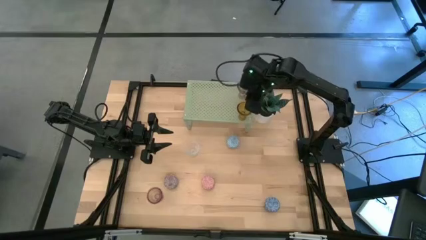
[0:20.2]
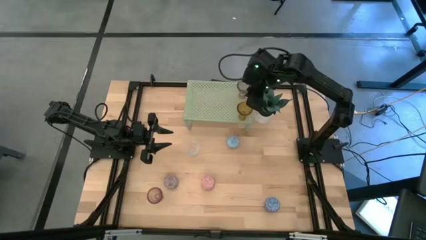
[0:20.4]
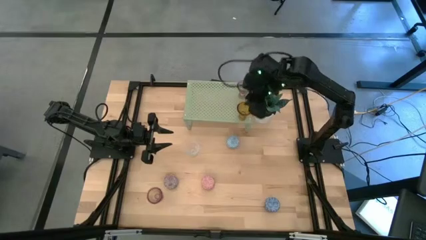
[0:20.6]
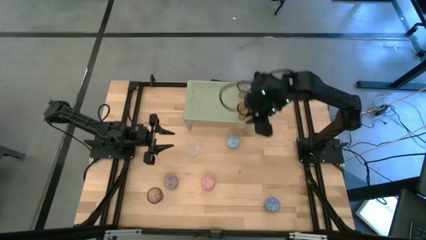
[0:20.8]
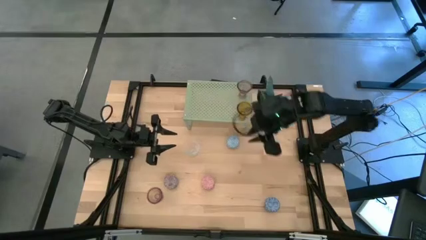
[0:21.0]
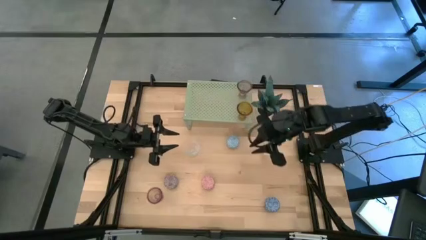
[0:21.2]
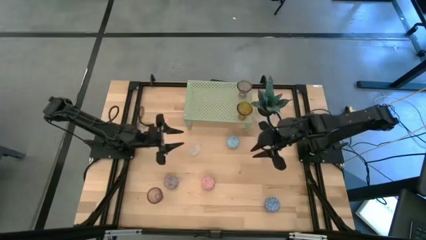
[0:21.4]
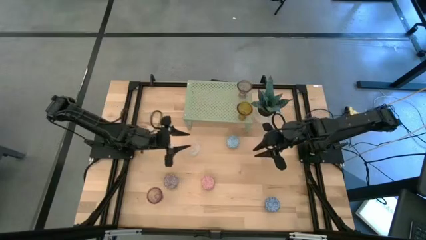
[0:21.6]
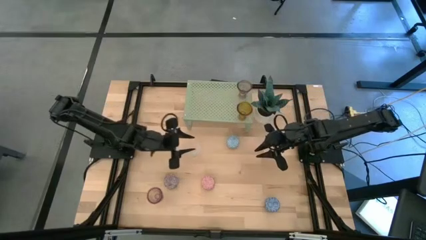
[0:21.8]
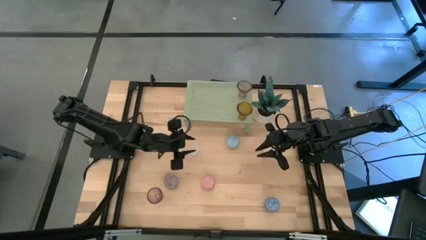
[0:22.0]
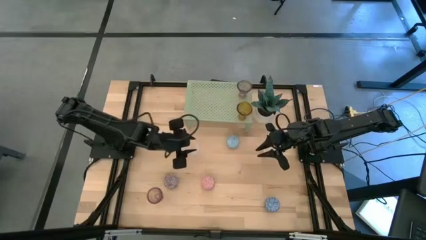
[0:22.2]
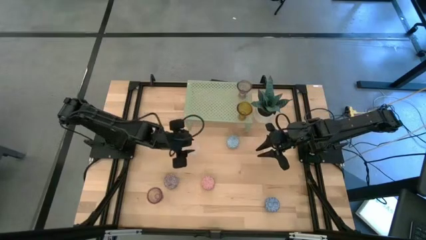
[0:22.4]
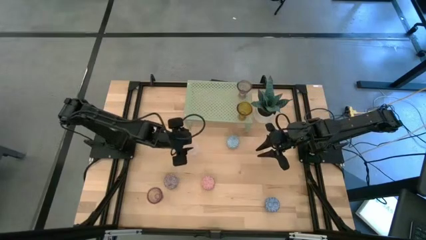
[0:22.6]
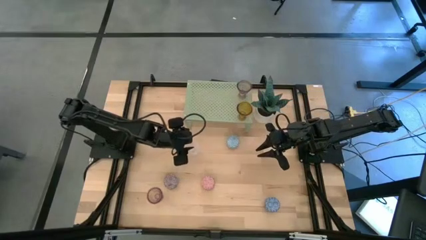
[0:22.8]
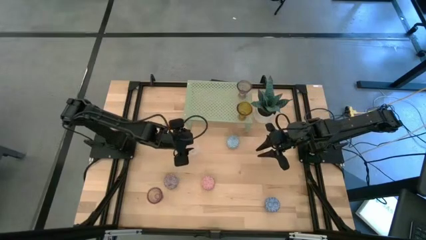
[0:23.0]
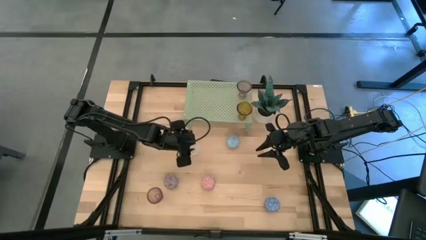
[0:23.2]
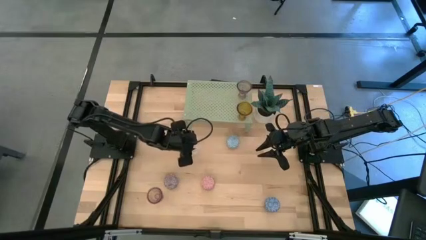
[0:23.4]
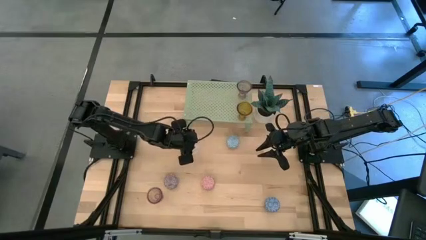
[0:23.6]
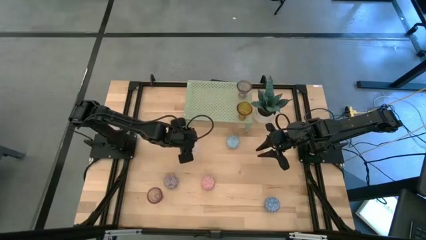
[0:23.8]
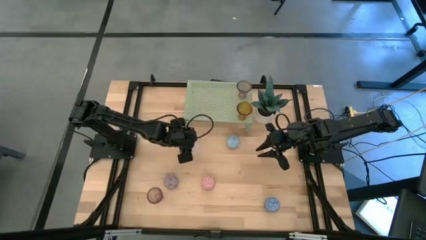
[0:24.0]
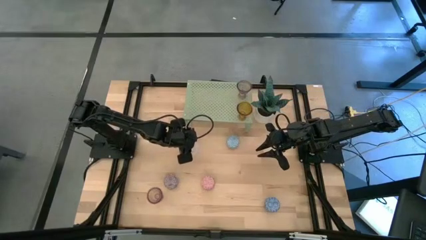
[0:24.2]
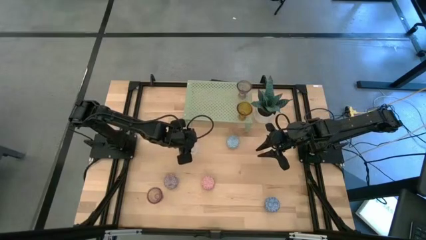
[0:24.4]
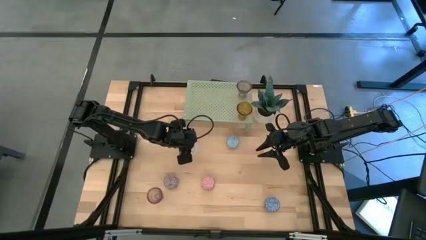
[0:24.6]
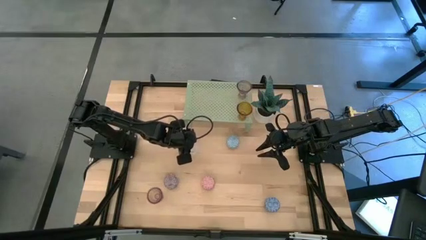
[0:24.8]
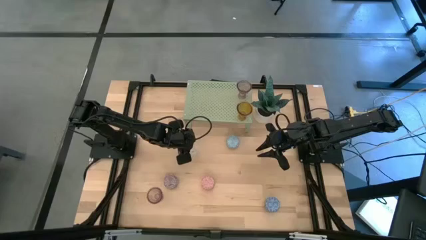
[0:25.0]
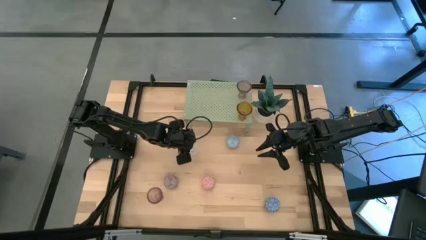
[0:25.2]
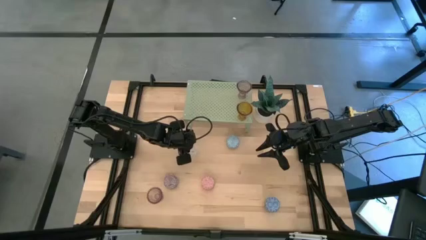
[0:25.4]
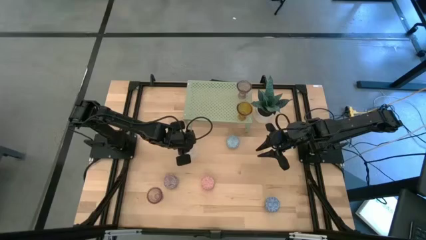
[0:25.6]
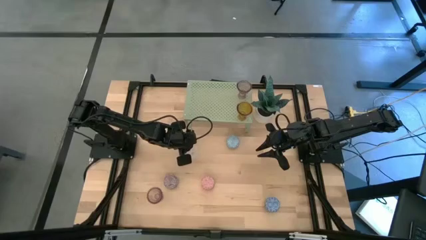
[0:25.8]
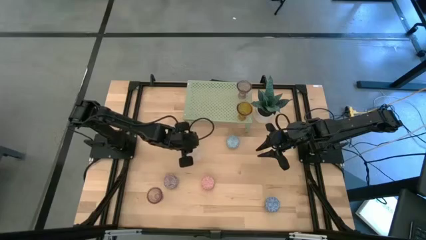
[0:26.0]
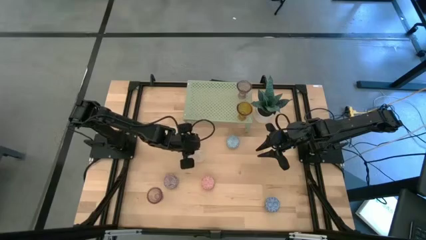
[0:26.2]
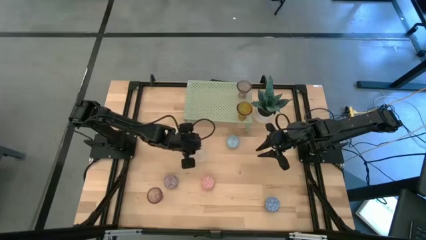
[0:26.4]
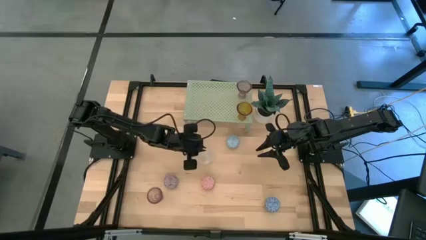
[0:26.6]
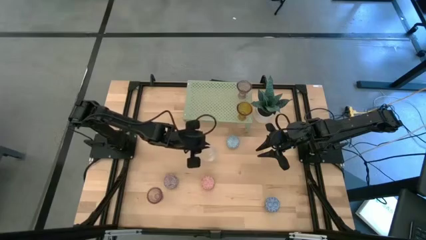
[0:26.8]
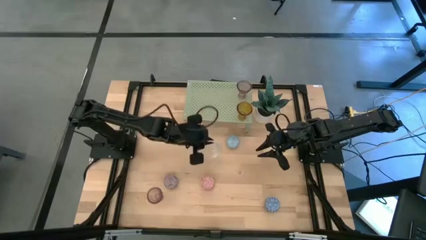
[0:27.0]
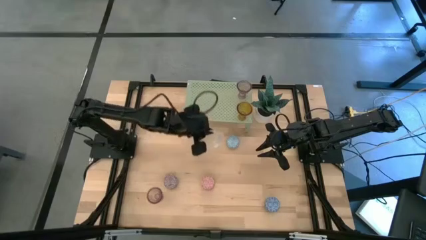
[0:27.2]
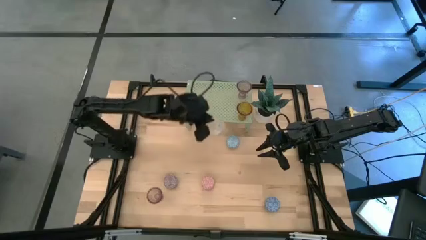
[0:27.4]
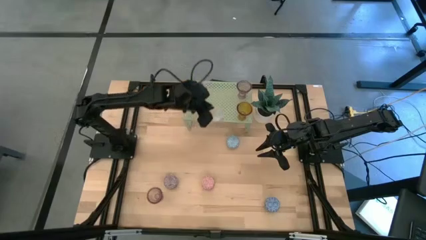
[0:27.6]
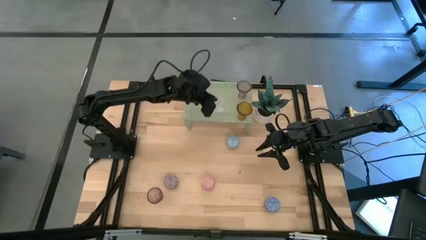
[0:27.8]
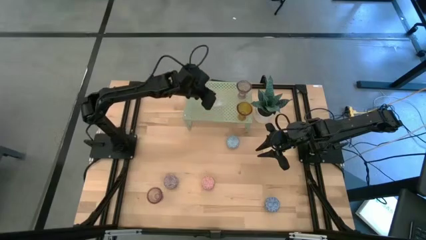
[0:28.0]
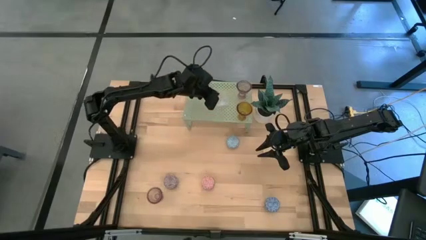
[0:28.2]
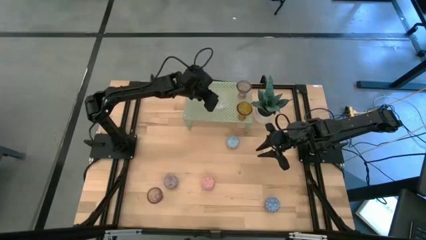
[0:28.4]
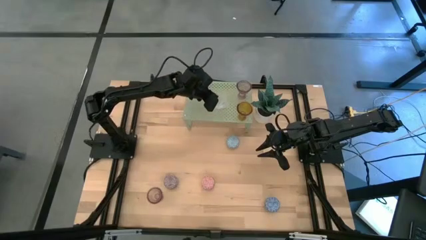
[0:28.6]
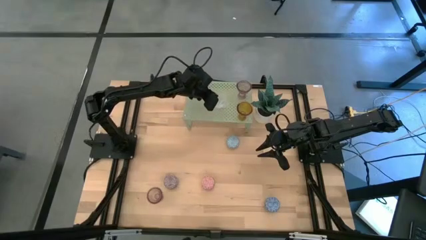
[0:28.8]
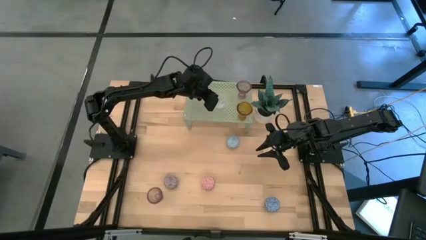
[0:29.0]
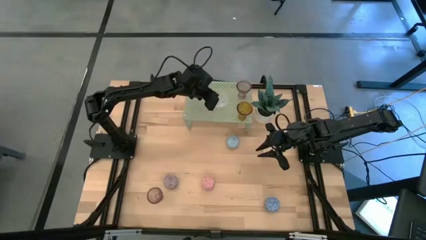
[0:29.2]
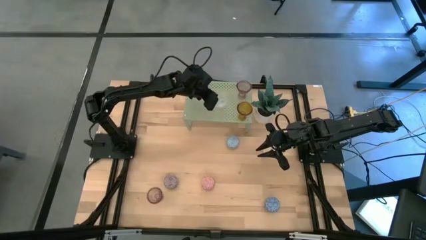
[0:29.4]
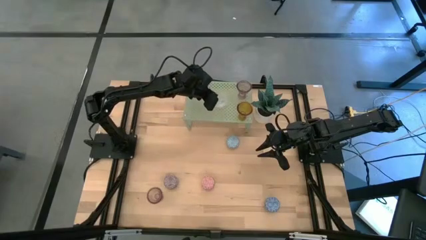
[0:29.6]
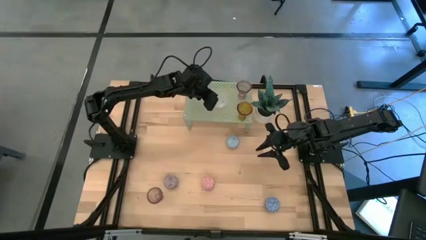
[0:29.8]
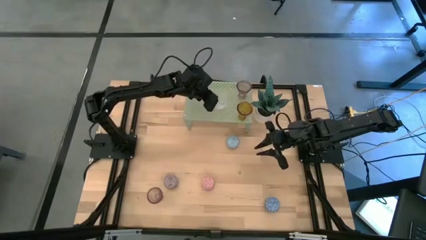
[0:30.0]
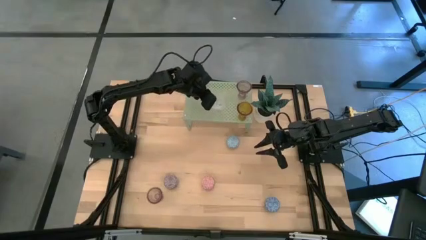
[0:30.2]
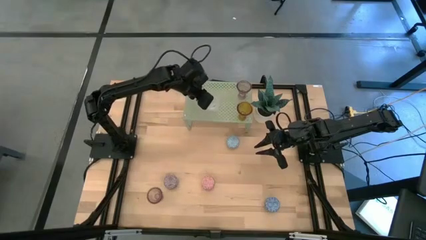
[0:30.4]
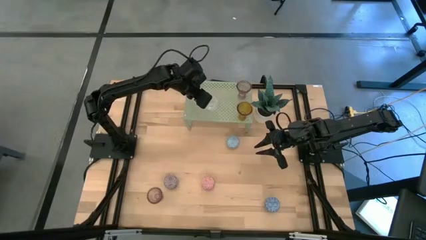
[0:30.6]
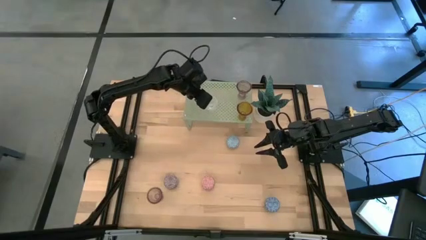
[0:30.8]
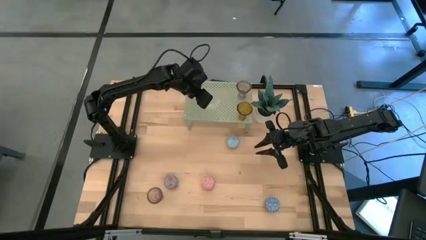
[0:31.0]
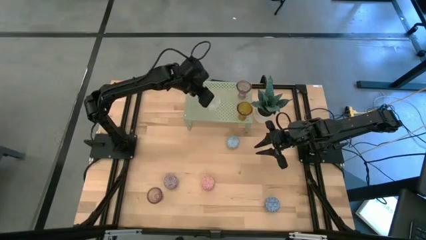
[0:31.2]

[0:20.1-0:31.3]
Task: Pick & Place candle stick holders
Put the transparent glass candle holder on the shelf

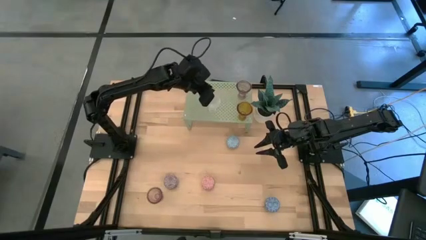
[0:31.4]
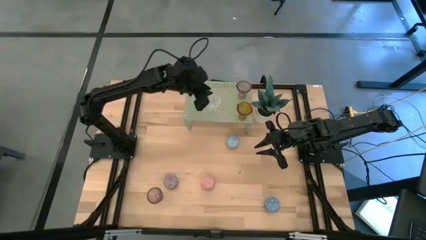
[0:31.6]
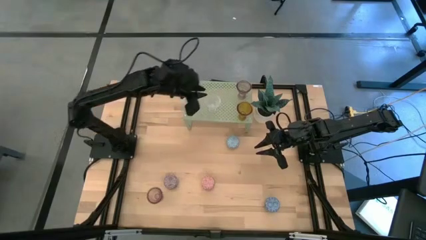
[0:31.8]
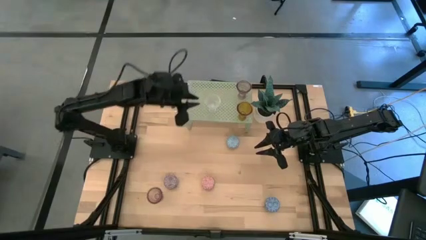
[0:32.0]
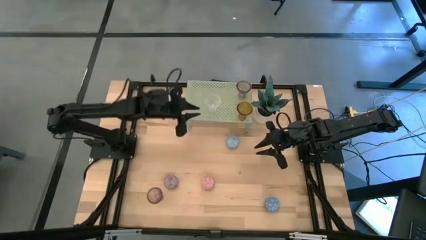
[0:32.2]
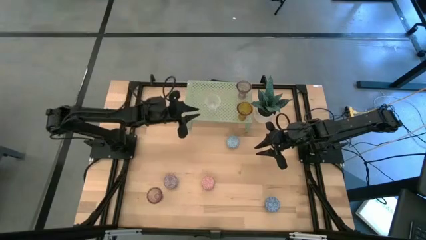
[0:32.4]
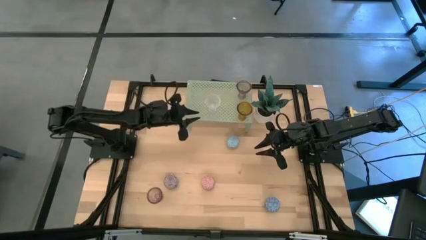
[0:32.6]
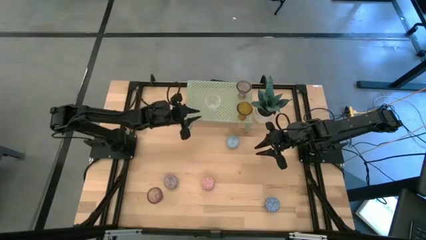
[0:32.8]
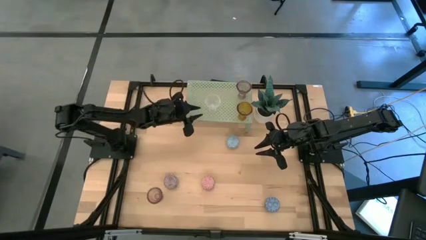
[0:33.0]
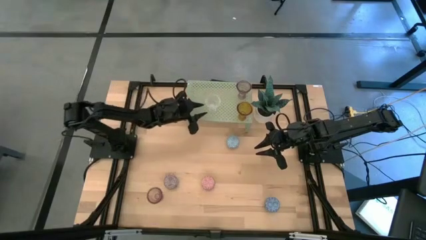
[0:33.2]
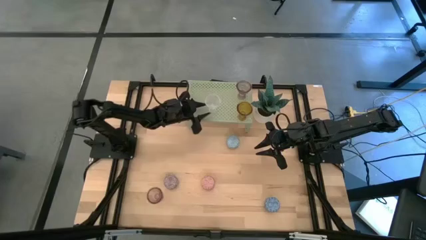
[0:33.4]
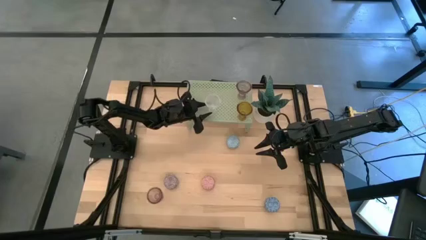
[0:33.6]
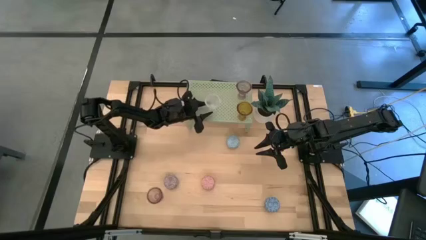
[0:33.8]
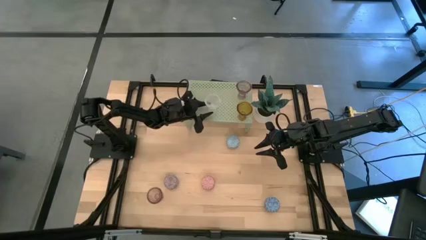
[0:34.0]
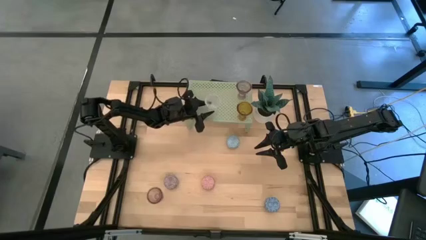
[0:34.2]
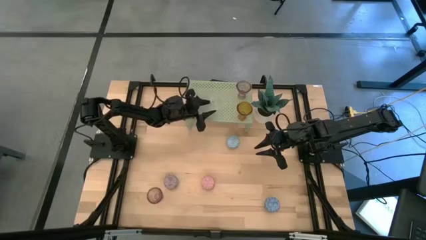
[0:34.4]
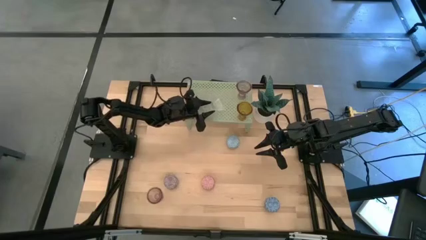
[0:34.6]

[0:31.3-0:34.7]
Put the transparent glass candle holder on the shelf

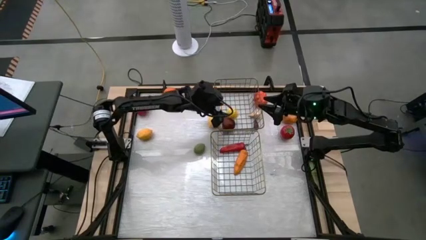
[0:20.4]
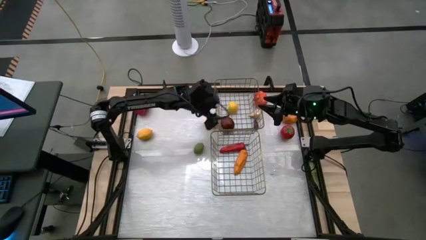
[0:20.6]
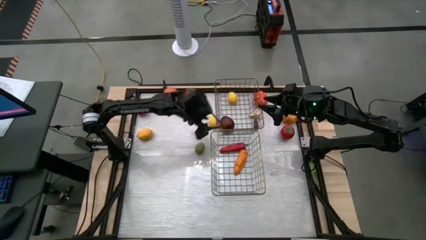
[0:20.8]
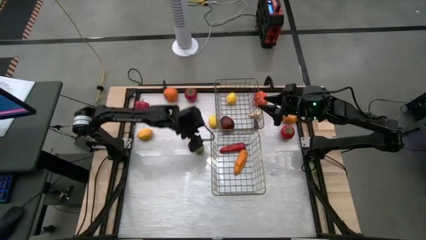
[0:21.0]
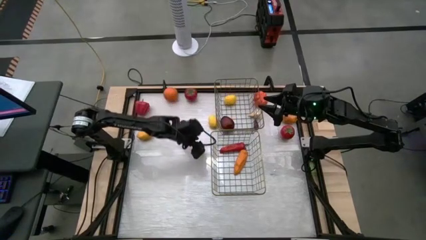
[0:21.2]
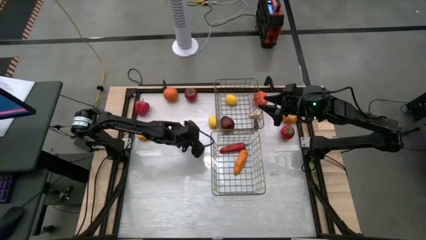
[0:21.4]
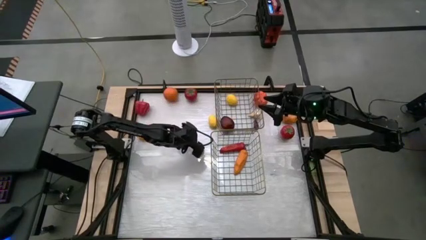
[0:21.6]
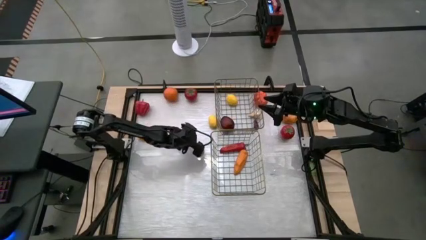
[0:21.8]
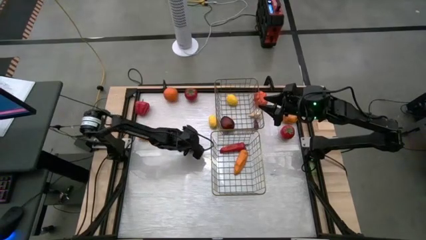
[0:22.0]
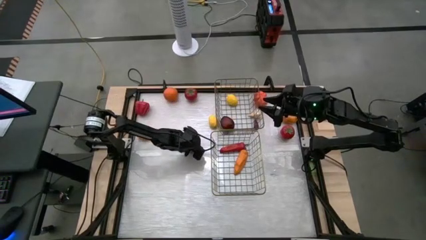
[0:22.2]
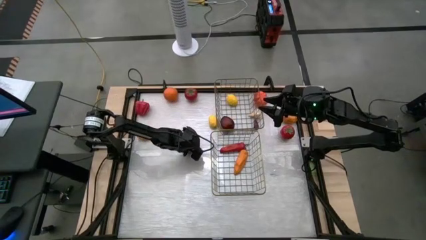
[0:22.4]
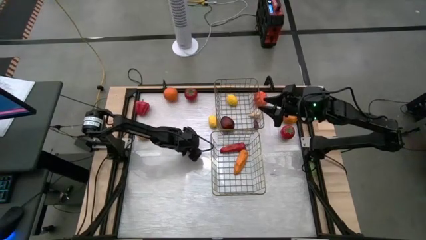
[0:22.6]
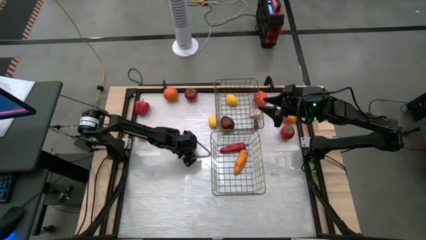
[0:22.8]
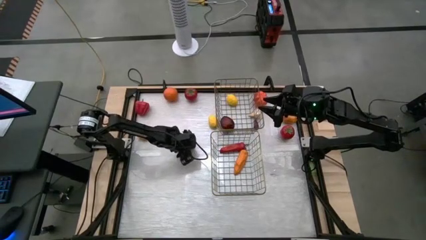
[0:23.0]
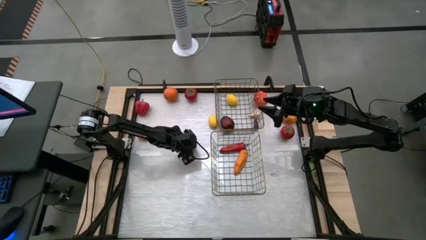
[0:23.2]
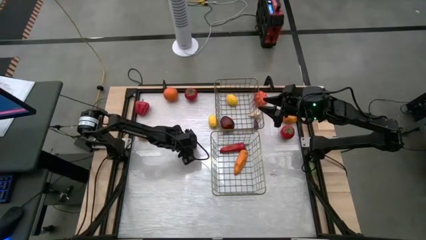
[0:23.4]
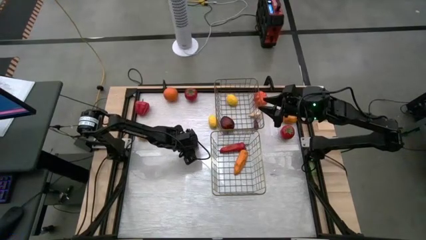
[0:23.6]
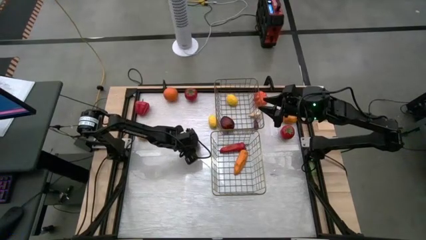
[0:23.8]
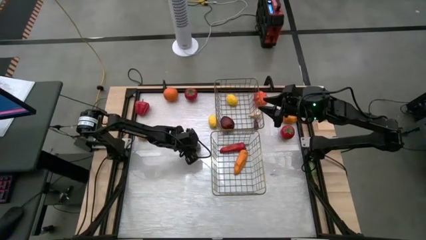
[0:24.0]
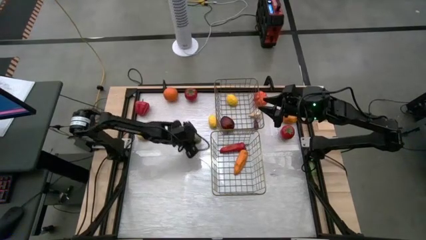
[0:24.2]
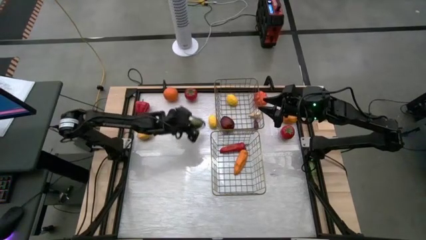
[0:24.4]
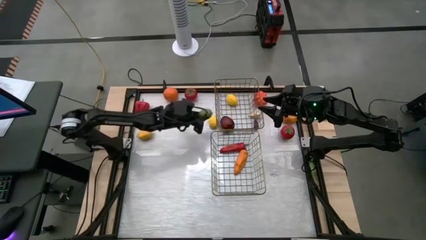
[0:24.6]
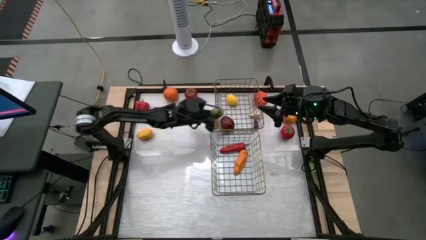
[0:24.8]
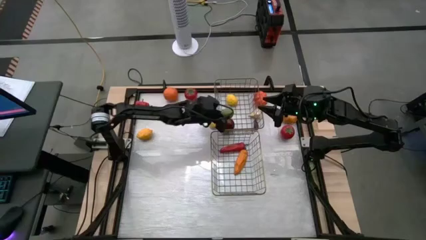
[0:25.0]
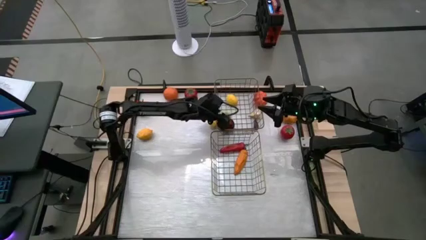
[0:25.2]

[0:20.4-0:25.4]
Task: Sort produce into baskets
Put the left green lime into the top wire basket
